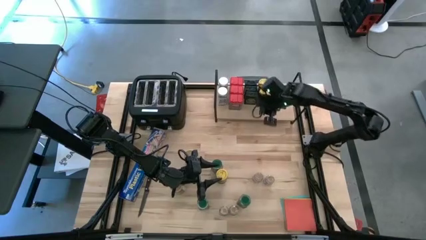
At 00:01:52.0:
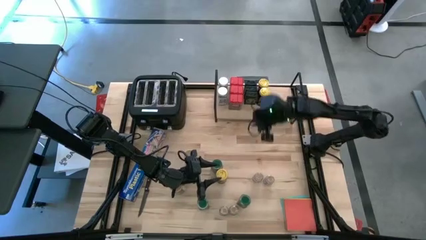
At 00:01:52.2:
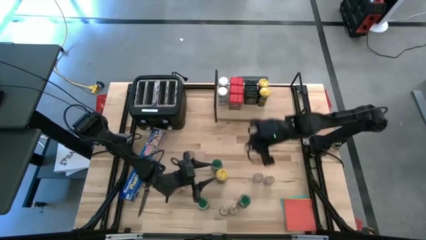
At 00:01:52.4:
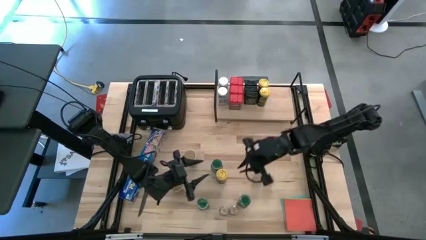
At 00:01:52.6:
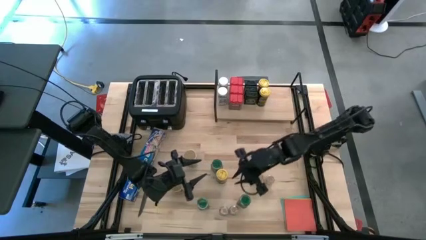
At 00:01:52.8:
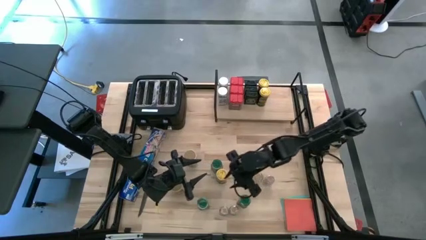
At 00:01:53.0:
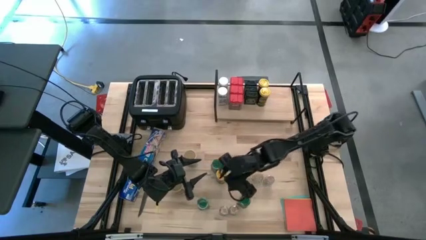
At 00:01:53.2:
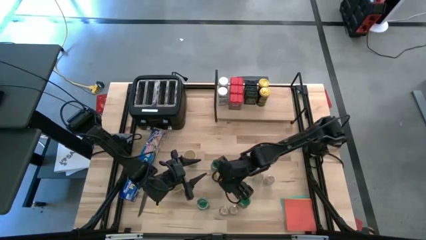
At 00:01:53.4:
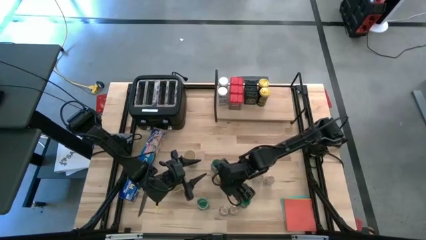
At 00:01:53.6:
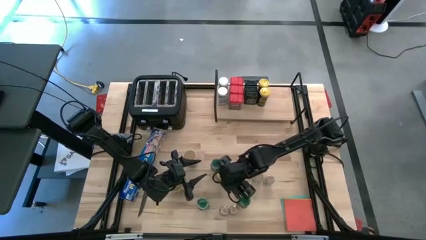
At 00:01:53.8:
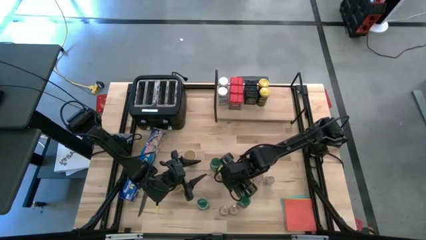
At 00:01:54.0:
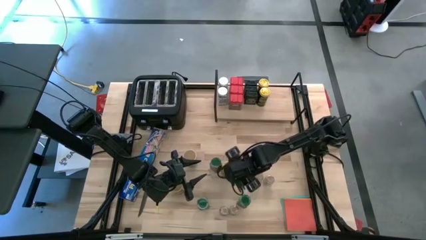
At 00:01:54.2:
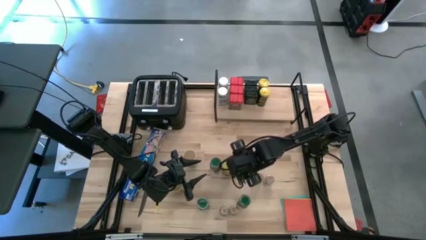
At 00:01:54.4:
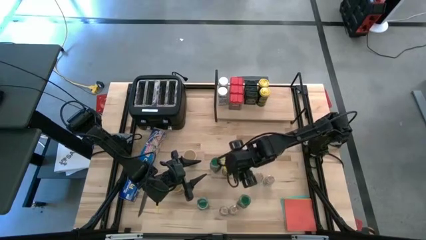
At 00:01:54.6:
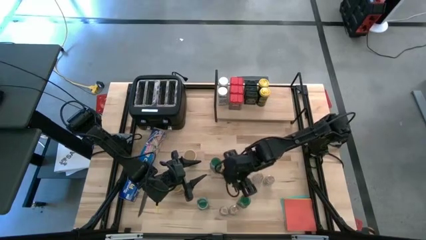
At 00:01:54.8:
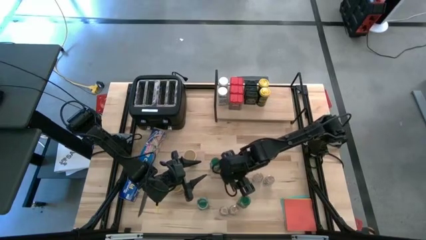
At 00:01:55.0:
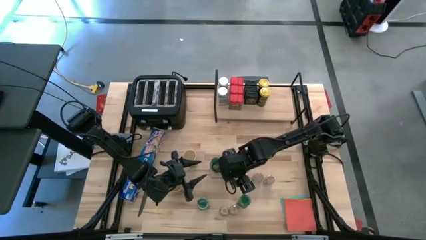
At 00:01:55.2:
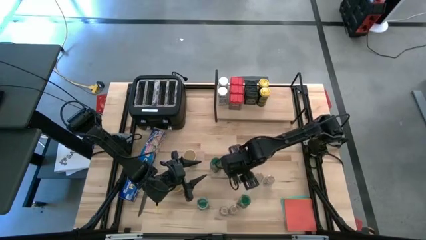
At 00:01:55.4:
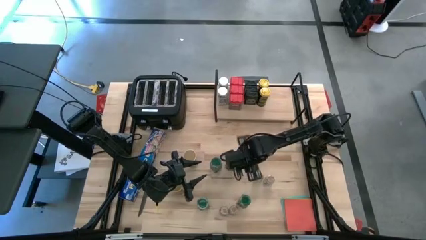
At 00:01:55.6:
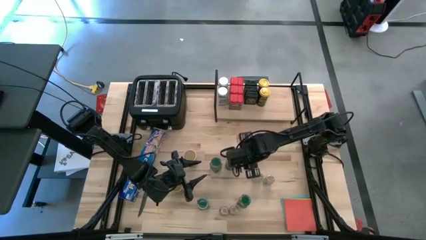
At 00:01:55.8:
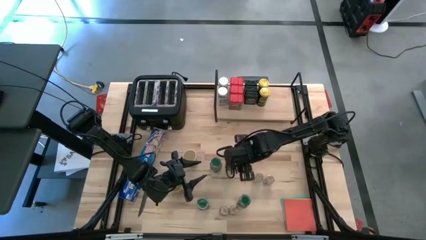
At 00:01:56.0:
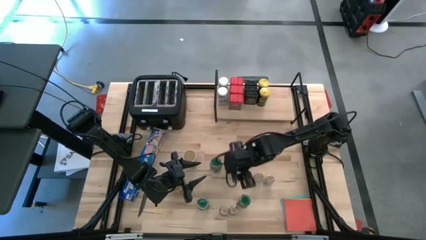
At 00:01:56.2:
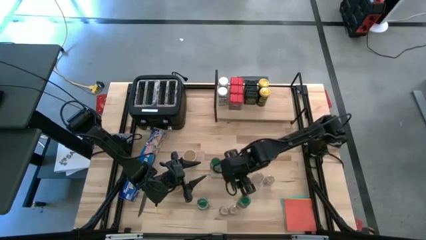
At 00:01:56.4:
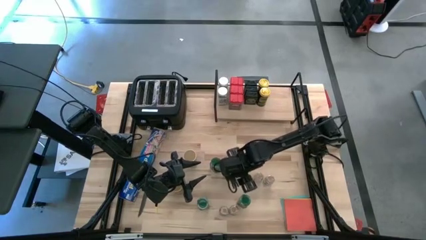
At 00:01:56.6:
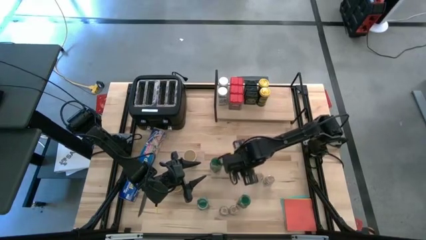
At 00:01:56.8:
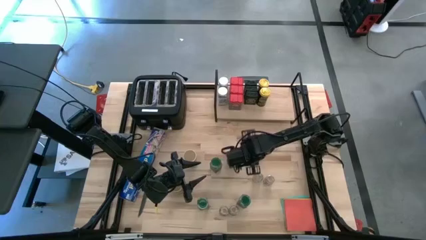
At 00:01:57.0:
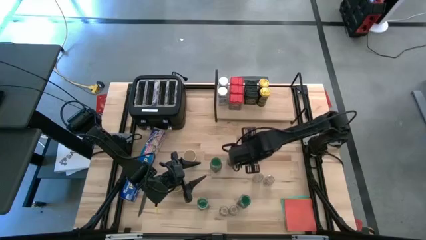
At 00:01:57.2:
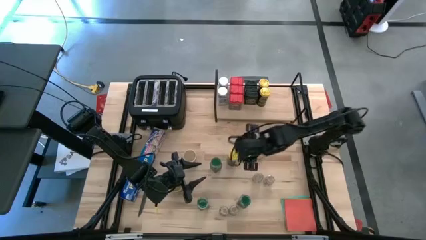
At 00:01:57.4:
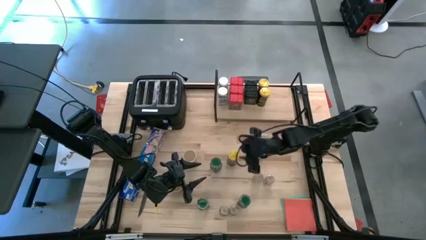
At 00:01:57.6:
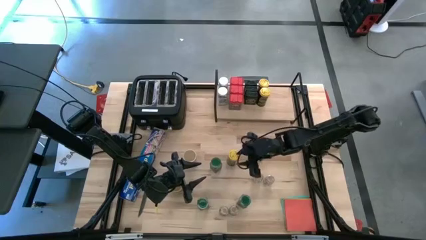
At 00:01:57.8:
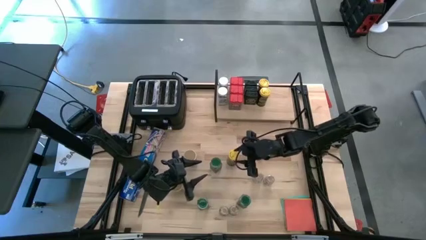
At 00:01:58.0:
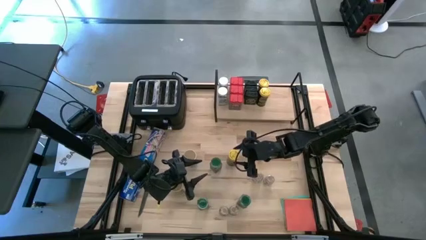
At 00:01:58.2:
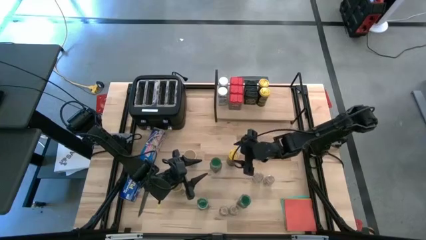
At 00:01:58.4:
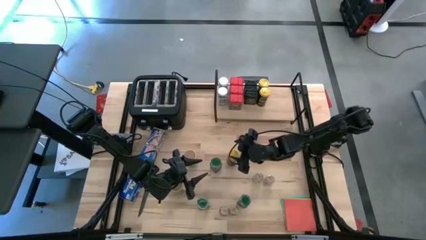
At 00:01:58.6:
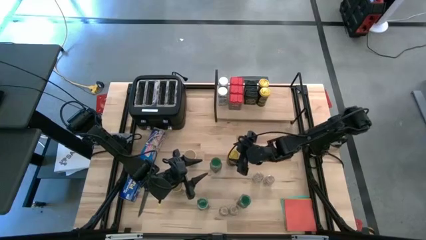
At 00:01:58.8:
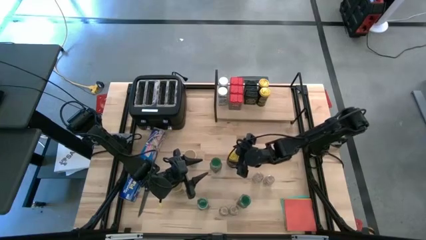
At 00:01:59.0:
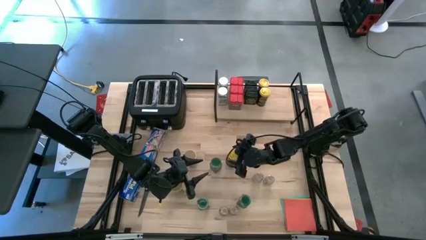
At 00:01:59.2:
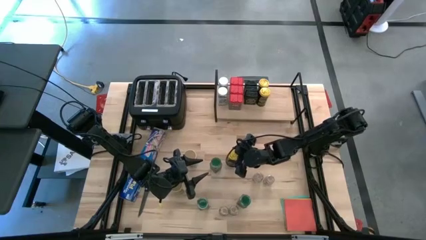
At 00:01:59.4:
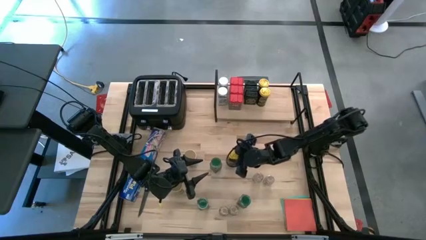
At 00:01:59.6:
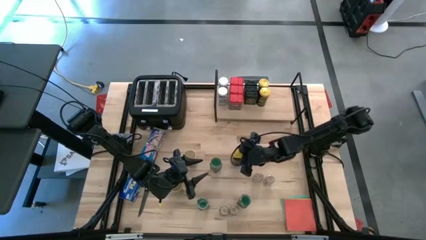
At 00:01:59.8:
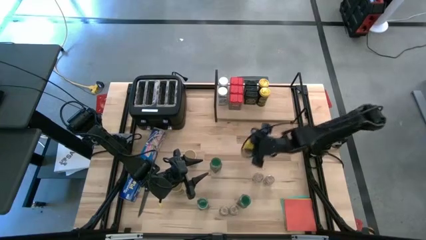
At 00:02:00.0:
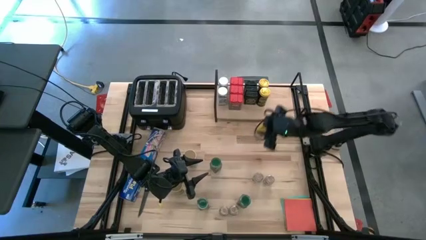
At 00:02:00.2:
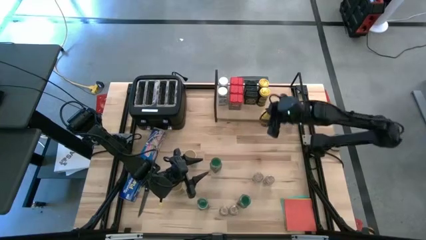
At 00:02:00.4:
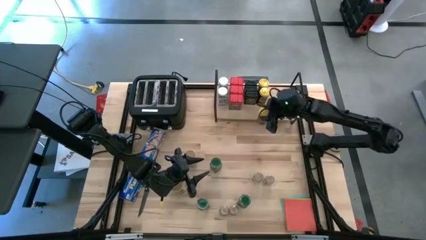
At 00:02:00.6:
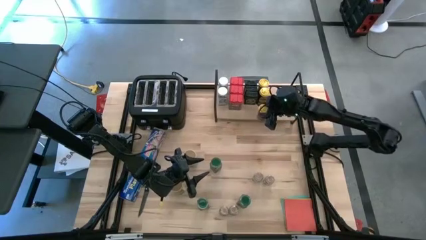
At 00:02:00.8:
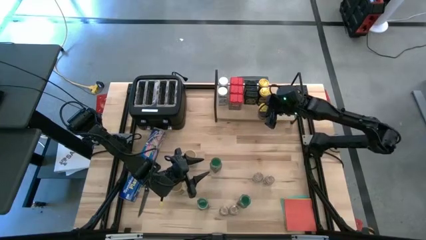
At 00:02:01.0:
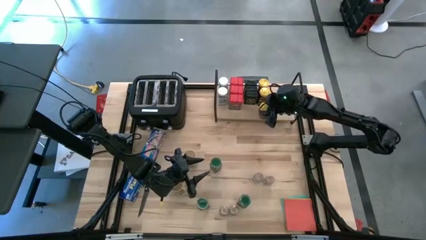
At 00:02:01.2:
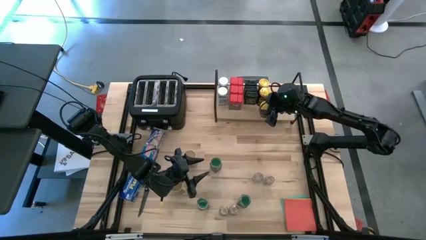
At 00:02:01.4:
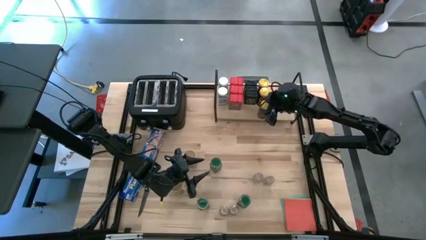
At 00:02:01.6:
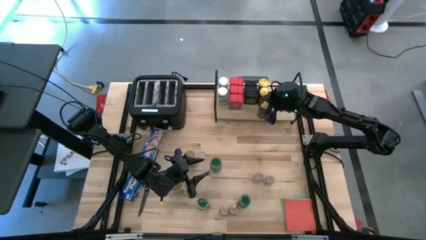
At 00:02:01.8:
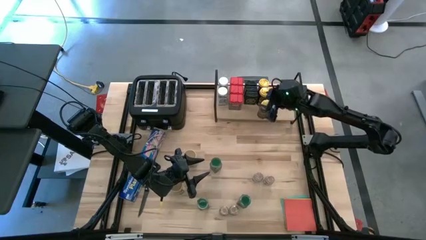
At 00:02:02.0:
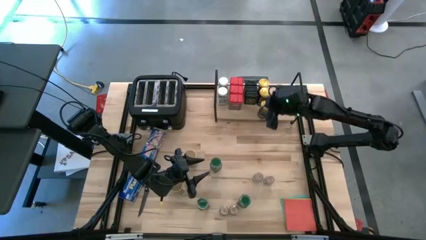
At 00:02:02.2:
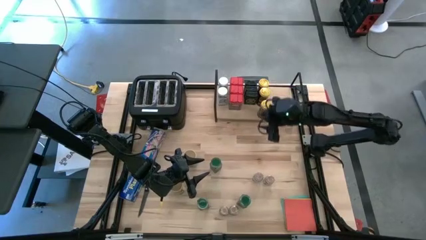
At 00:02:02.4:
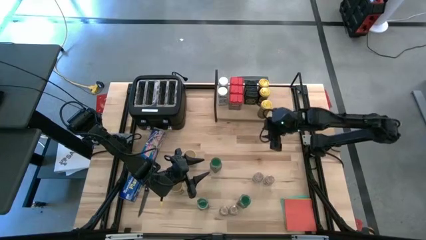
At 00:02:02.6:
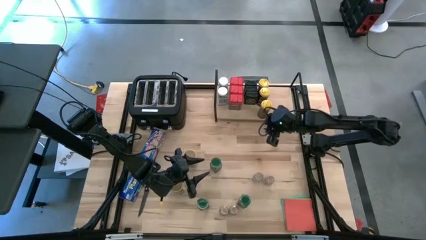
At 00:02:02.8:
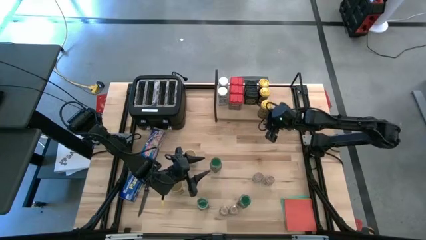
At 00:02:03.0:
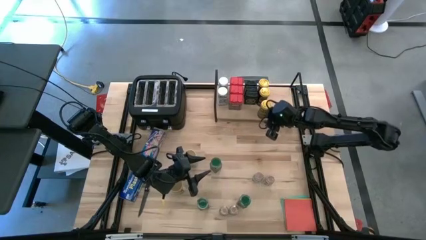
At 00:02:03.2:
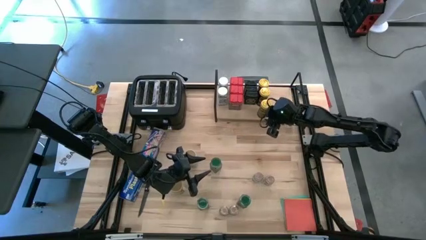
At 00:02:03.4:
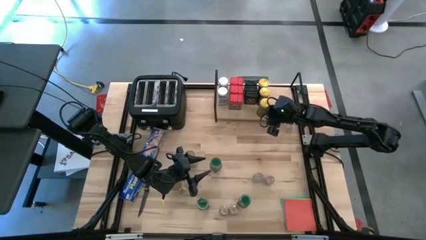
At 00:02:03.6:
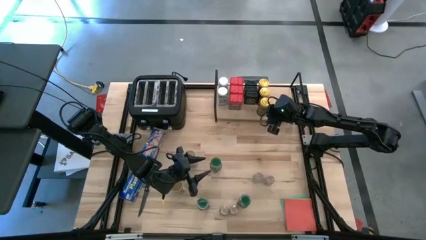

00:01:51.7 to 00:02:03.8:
Task: Shelf spices
Put the yellow seasoning bottle on the shelf aligned with the other yellow seasoning bottle
